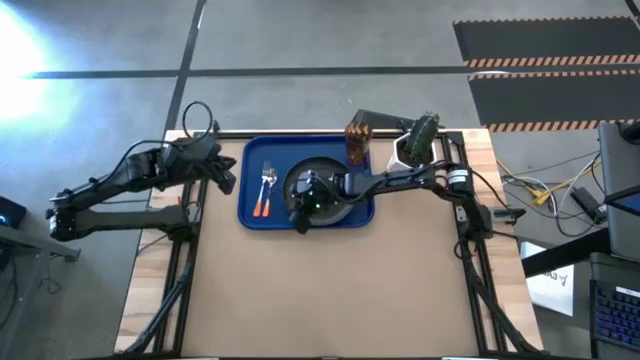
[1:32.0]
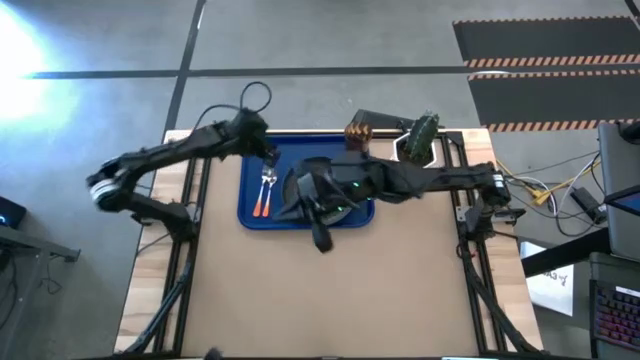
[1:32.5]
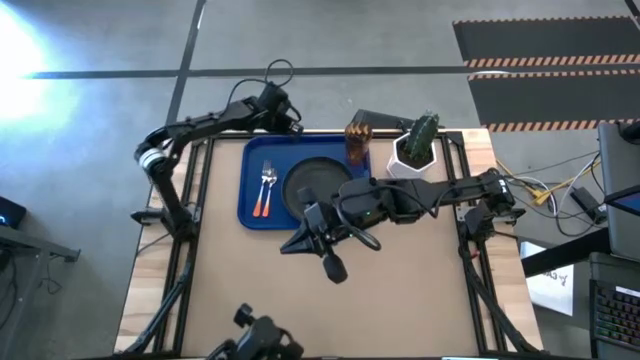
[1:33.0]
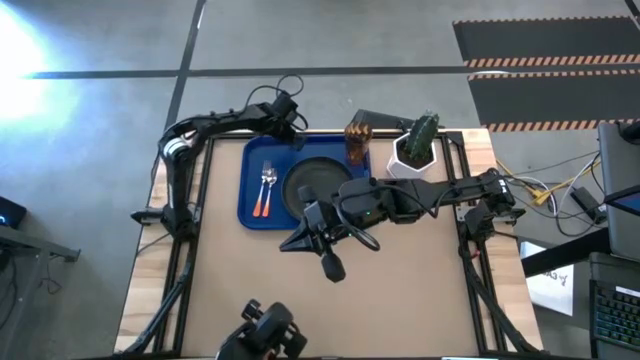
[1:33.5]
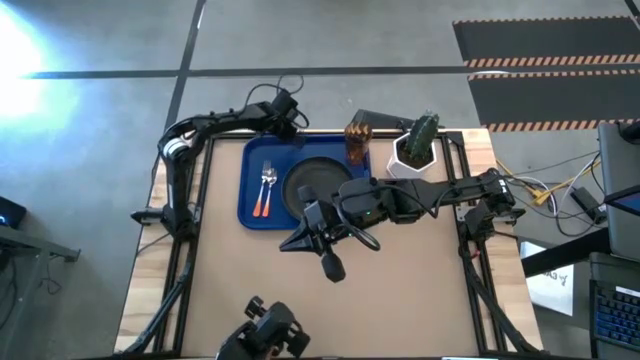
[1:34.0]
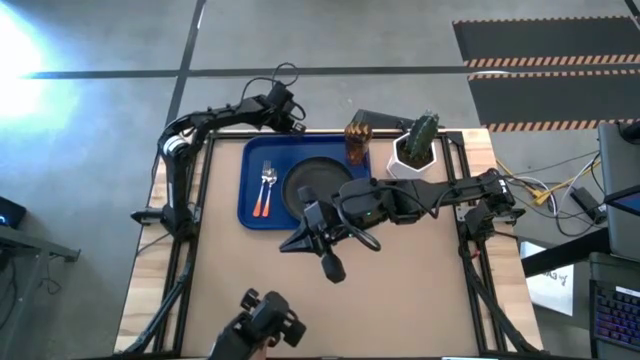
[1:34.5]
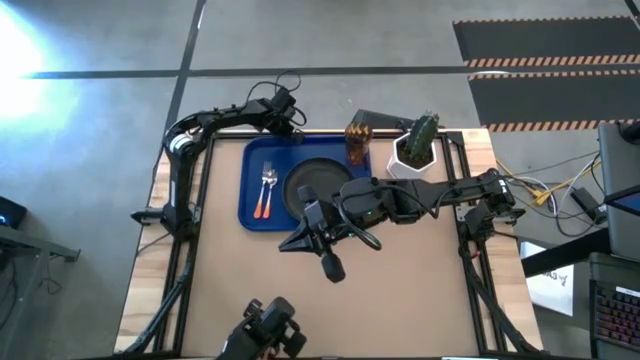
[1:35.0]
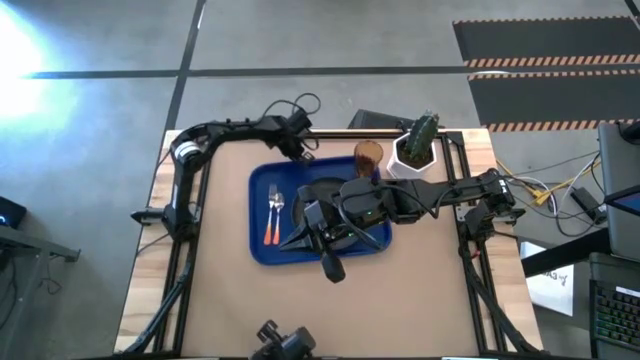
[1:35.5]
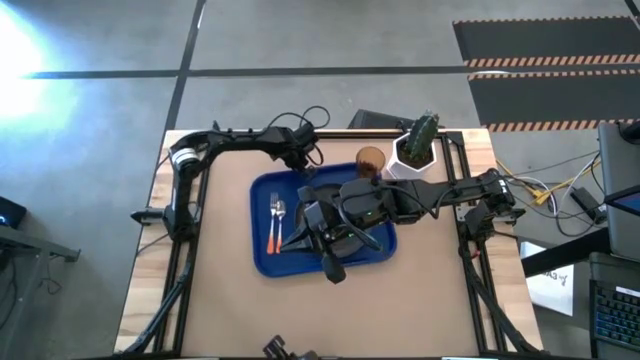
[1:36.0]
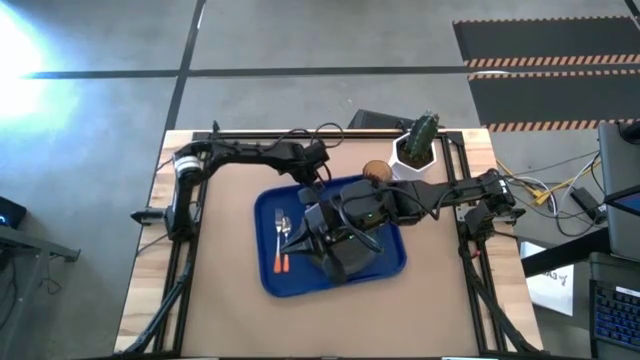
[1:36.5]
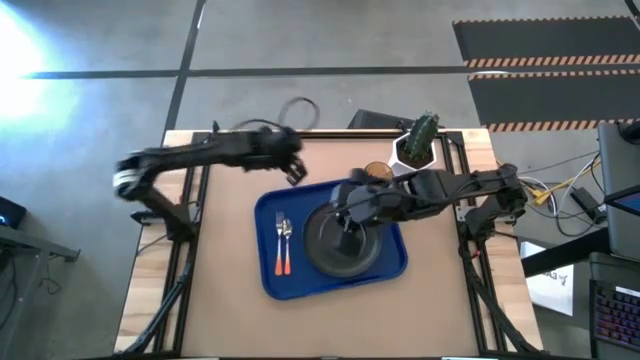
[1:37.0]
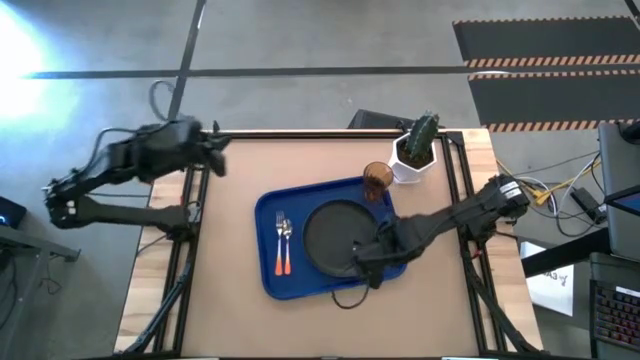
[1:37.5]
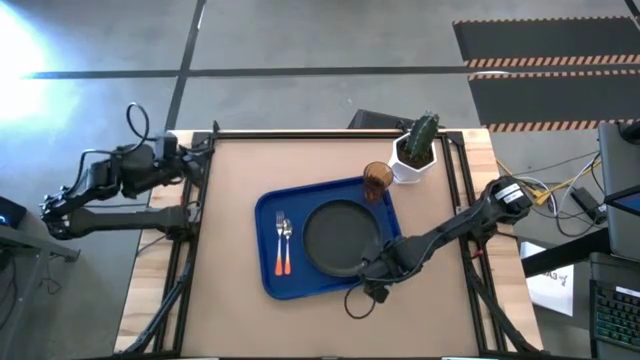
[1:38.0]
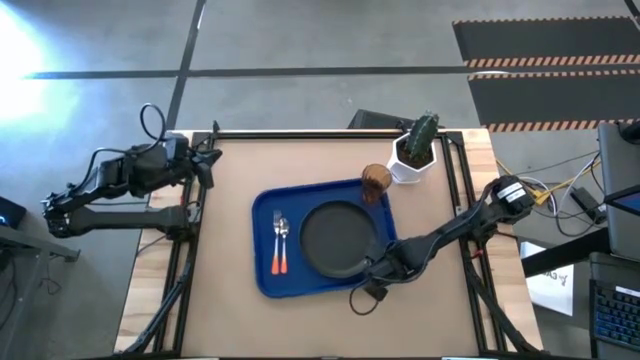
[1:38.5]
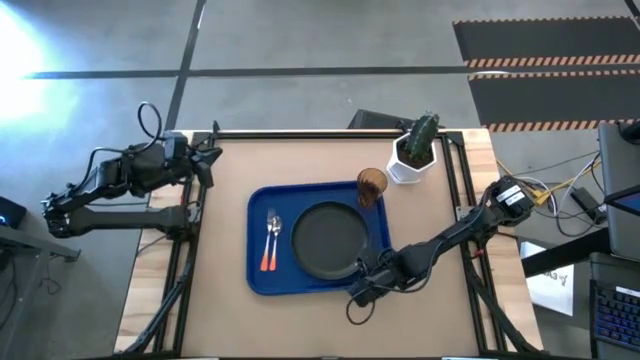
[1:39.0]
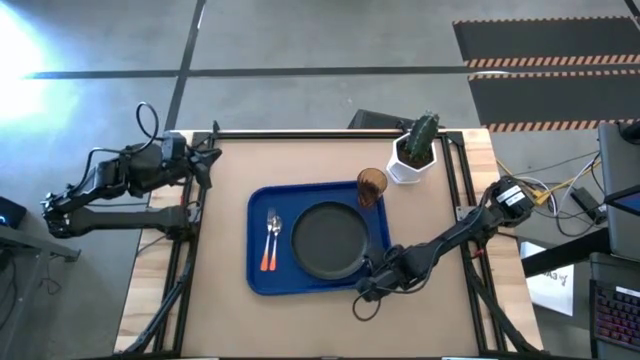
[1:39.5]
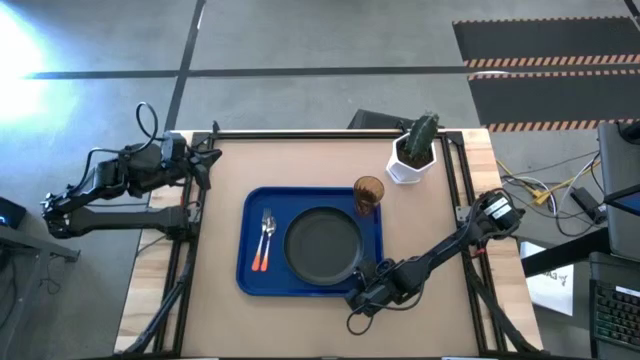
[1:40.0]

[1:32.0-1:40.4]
Task: Pick and place plate/cup/fork/spoon on tray
Move the blue tray to the middle of the table

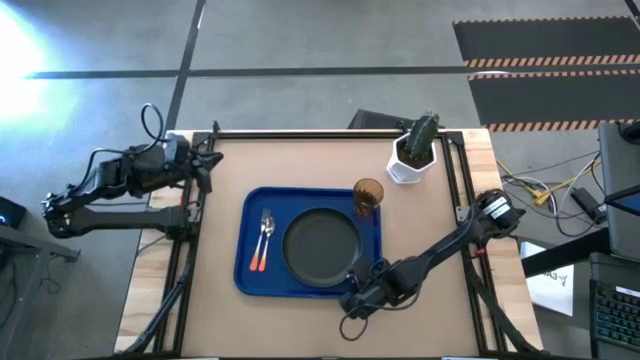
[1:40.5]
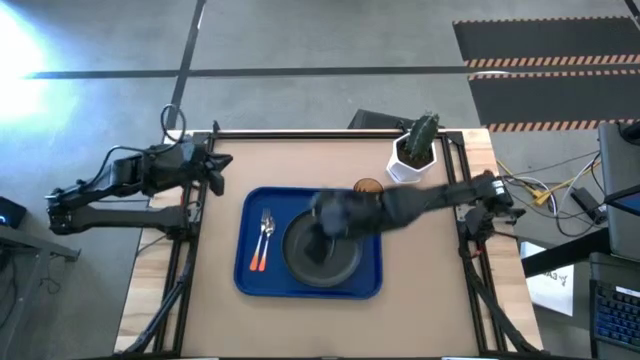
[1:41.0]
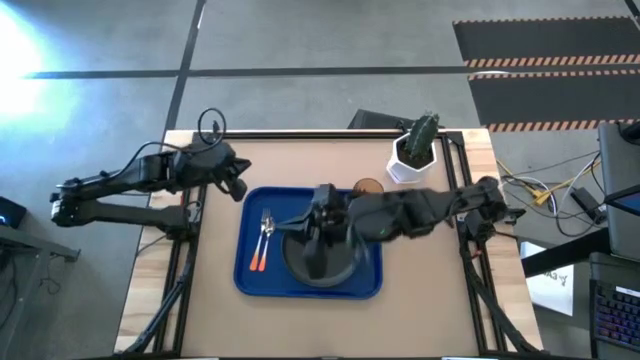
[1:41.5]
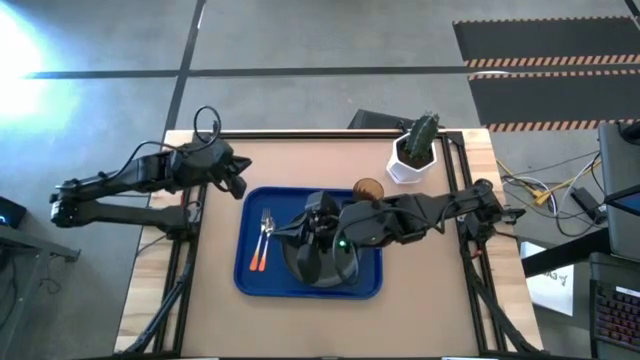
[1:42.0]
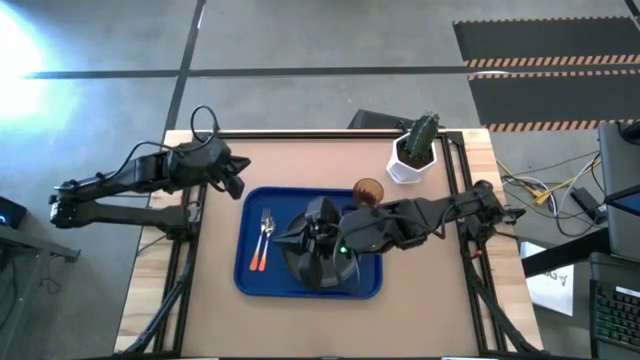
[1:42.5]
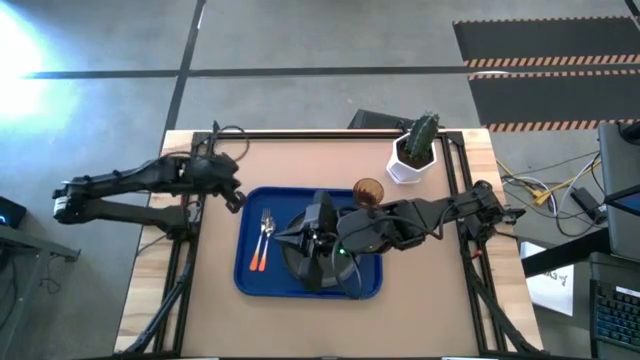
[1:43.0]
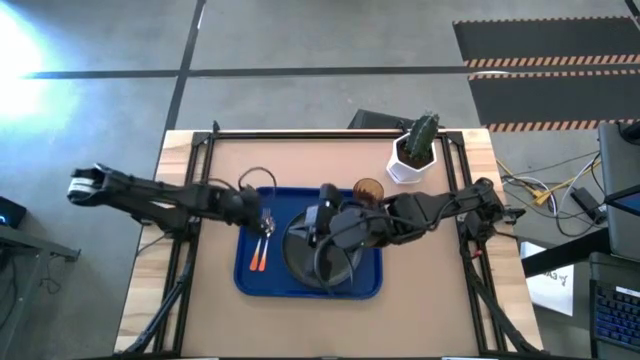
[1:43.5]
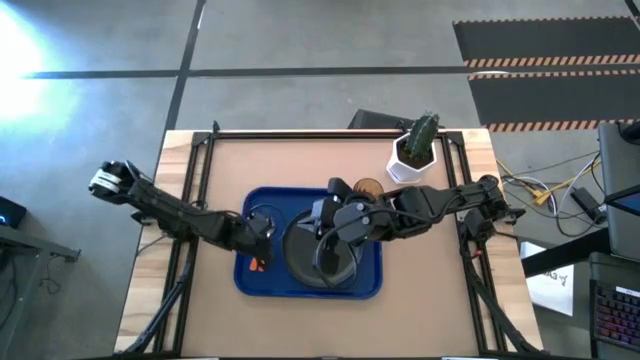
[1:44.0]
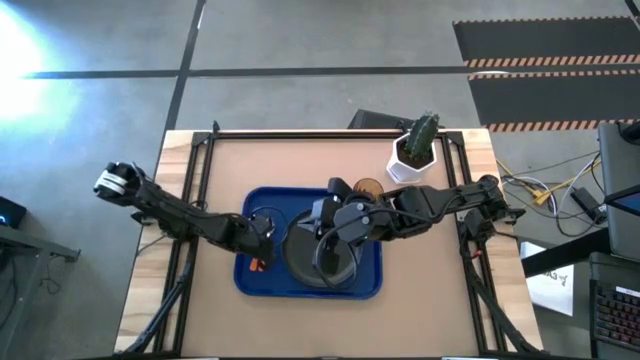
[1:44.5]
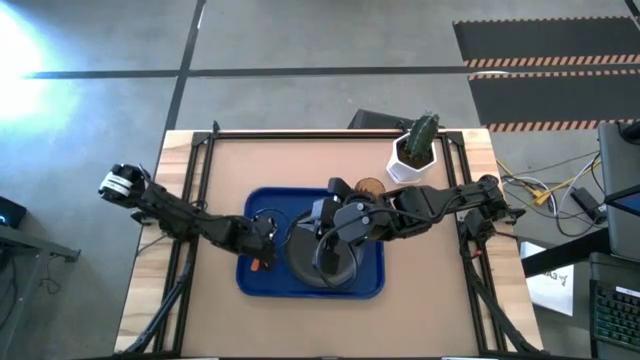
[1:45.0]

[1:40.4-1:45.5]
Adjust the orange spoon on the blue tray

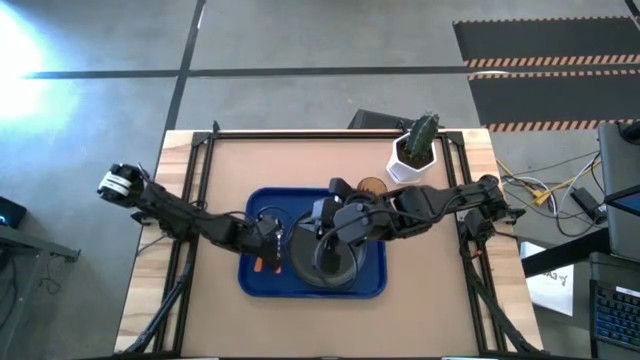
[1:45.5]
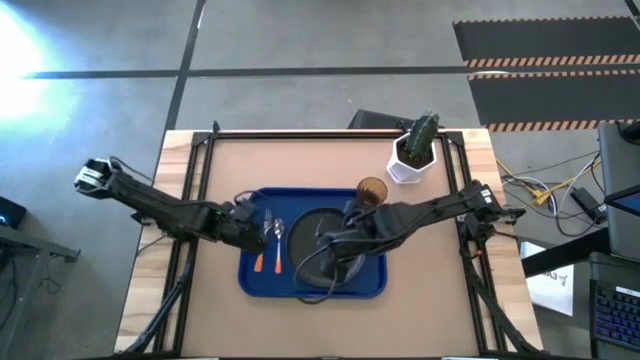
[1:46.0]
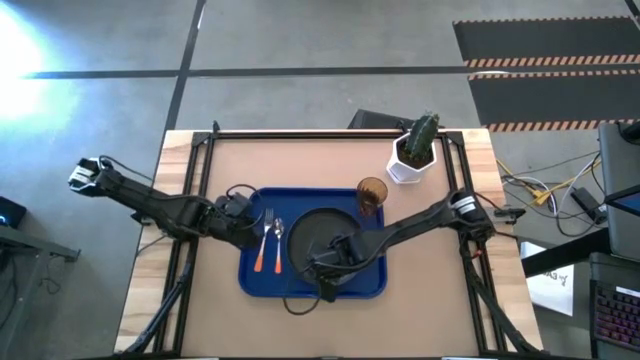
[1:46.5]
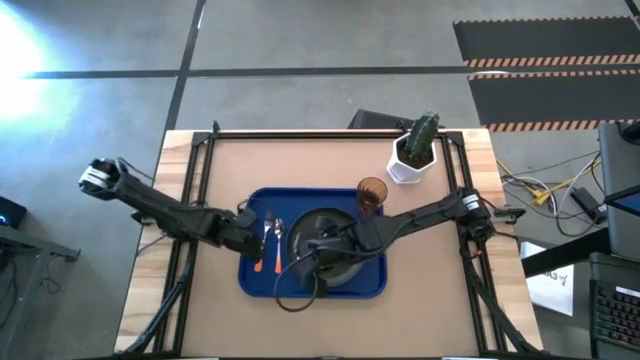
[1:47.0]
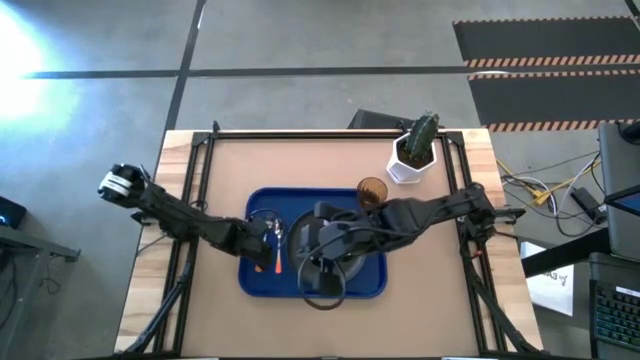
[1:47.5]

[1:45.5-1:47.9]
Adjust the orange fork on the blue tray

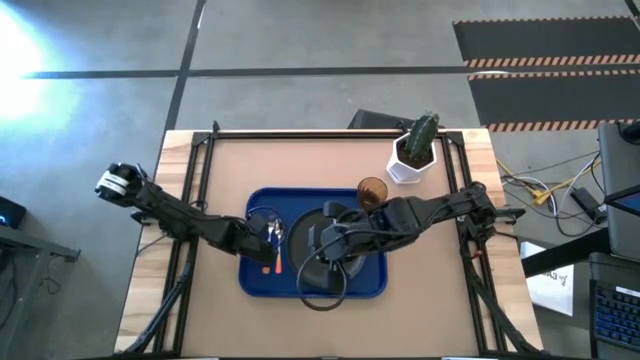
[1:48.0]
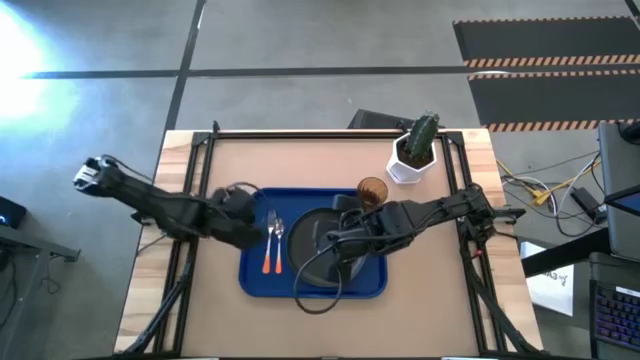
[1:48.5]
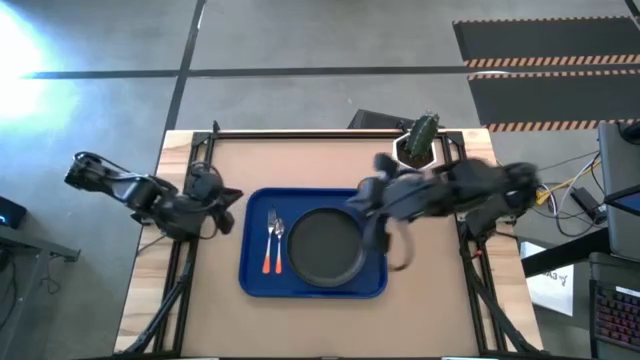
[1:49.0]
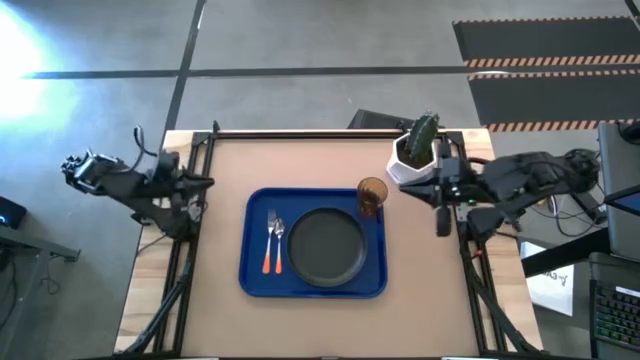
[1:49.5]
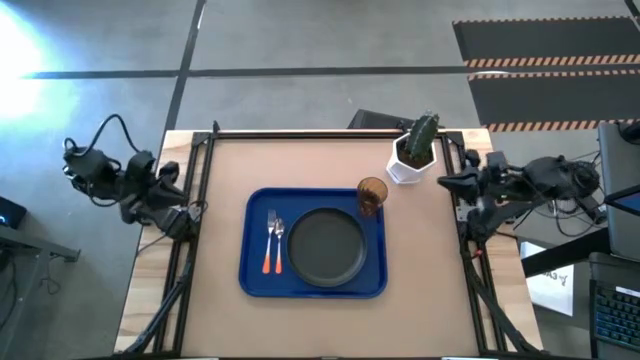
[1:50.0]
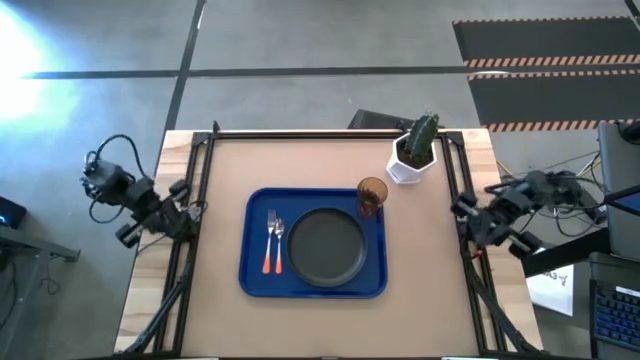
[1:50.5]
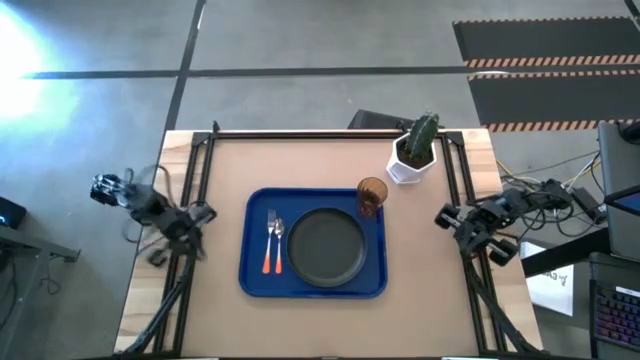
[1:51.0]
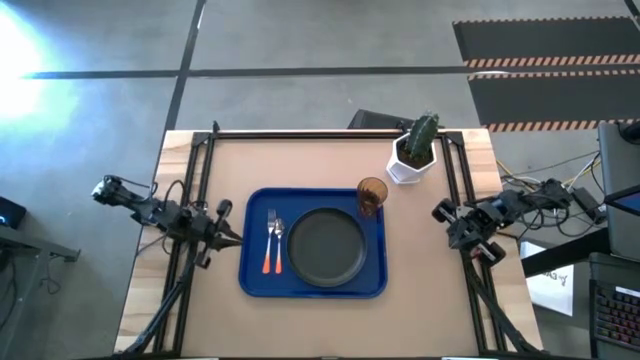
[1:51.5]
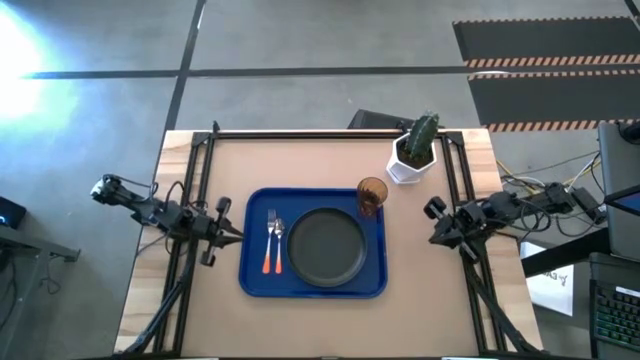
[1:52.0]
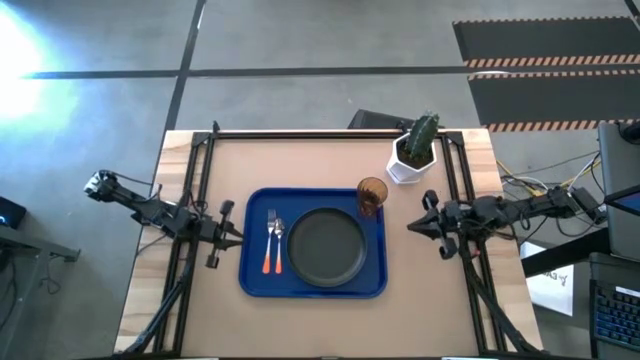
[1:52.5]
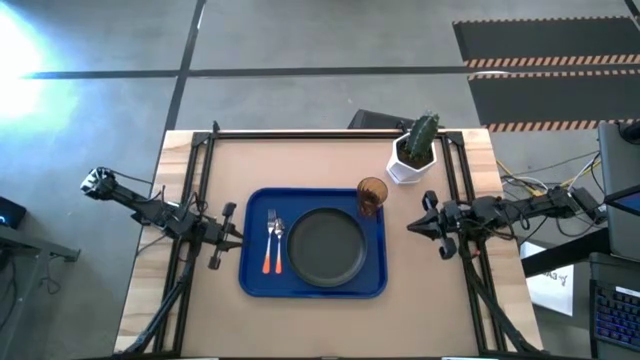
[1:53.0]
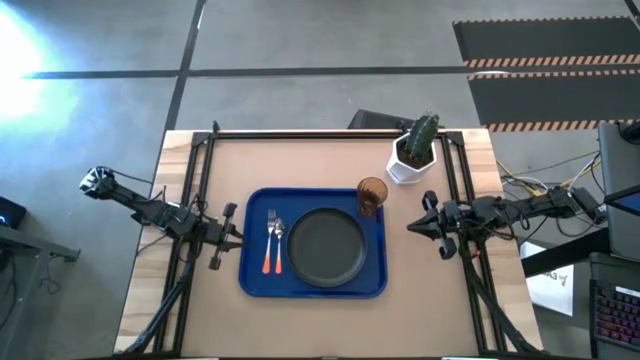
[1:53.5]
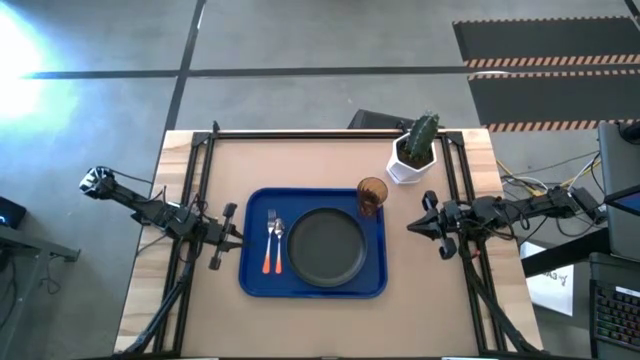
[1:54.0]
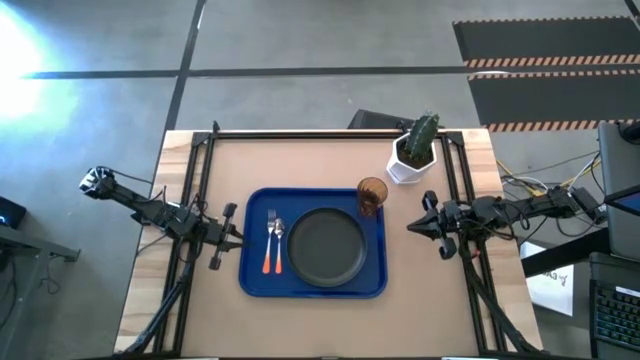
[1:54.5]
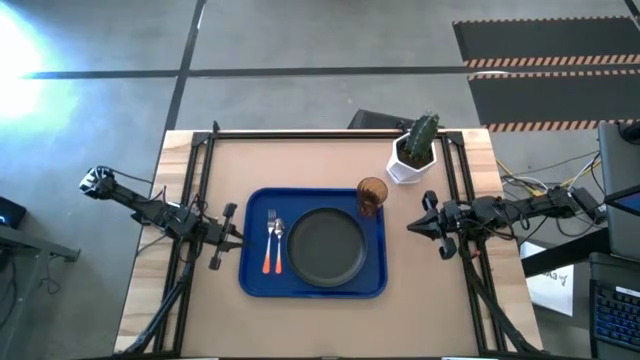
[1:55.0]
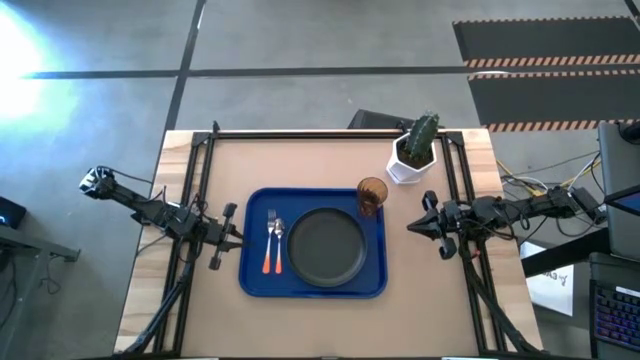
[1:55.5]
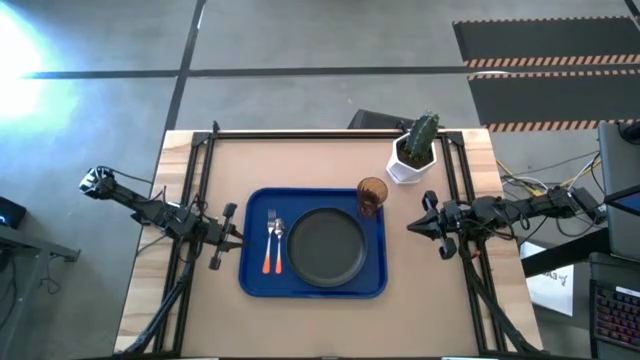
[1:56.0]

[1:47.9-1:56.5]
Return to Home Position
